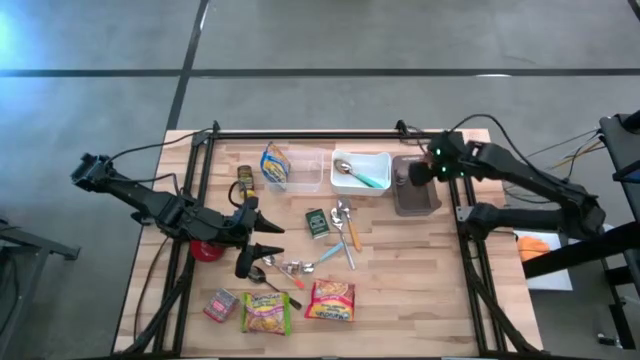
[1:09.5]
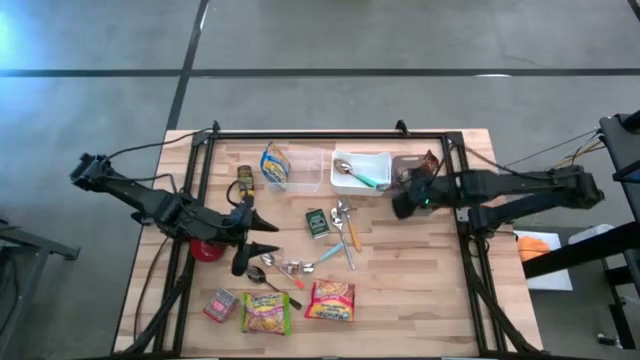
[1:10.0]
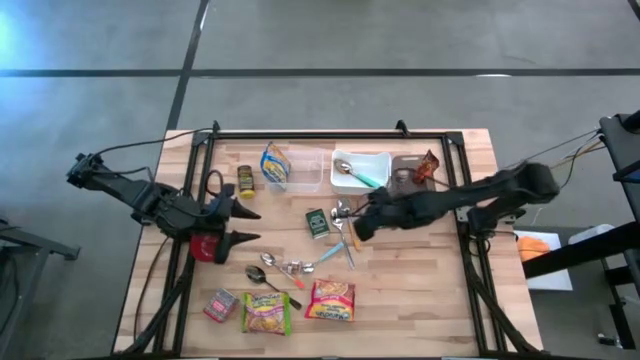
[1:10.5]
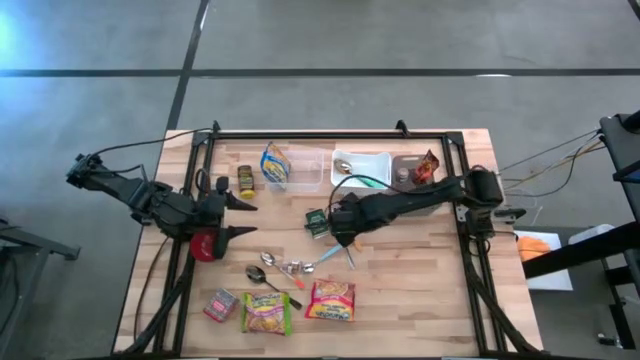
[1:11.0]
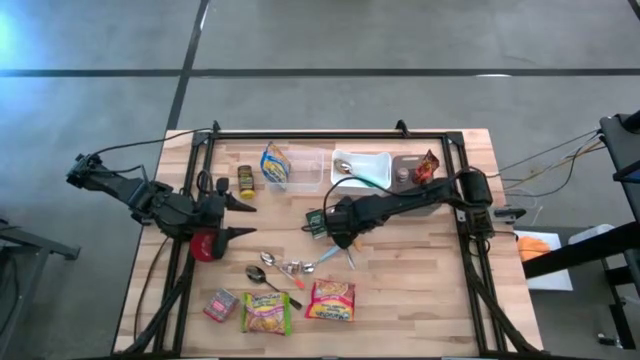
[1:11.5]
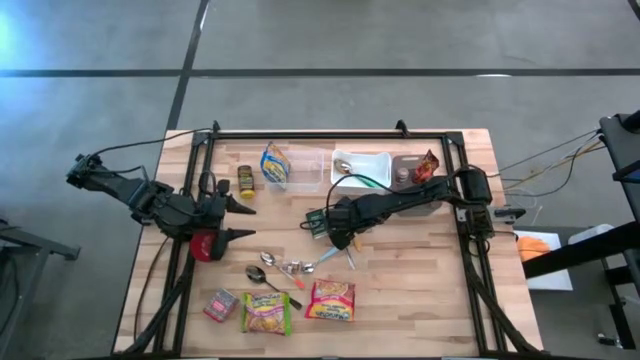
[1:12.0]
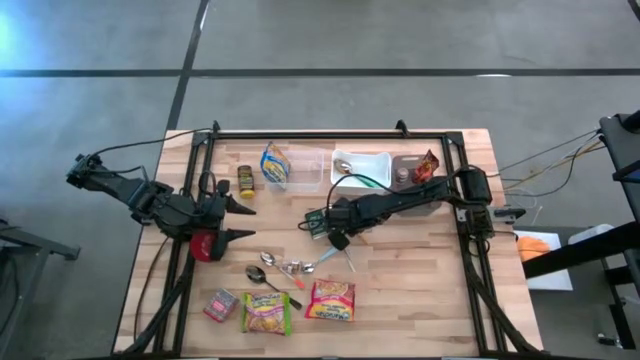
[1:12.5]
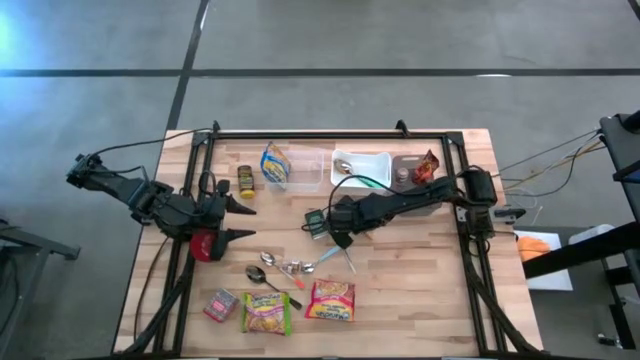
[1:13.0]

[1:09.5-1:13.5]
Put the orange spoon into the white bin

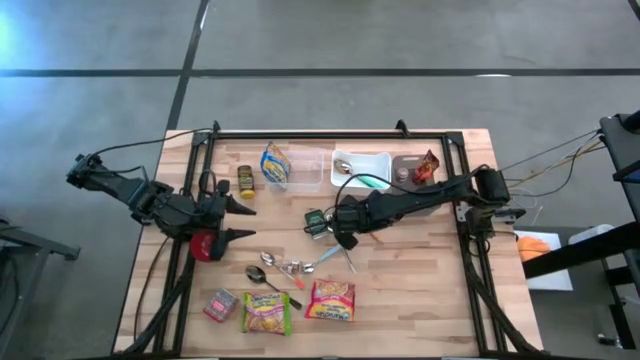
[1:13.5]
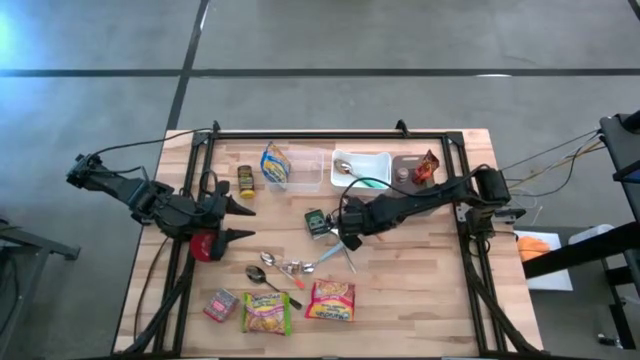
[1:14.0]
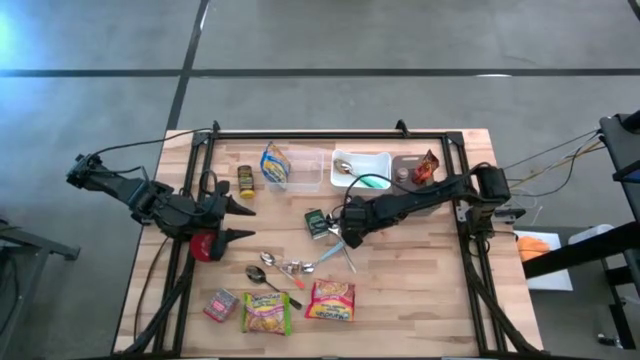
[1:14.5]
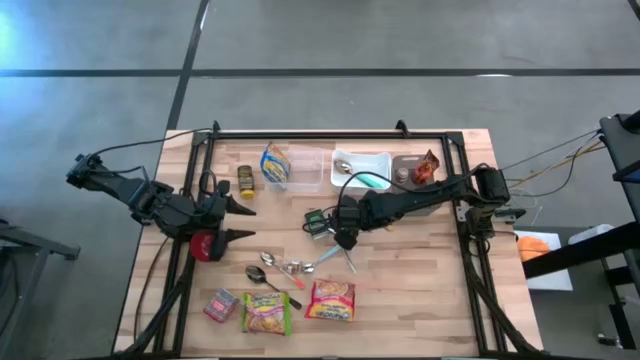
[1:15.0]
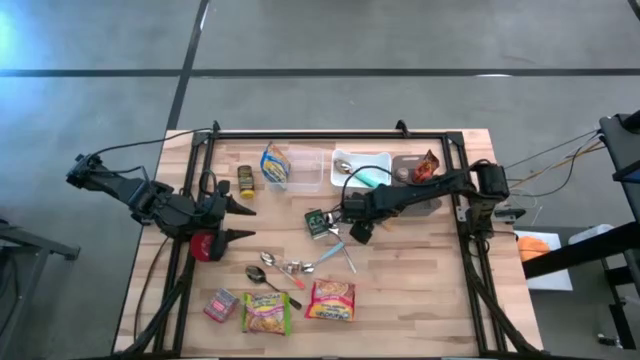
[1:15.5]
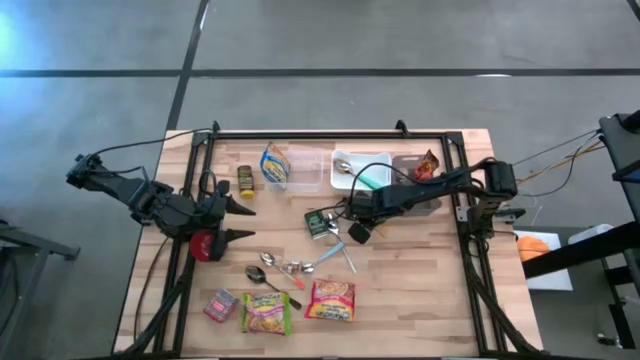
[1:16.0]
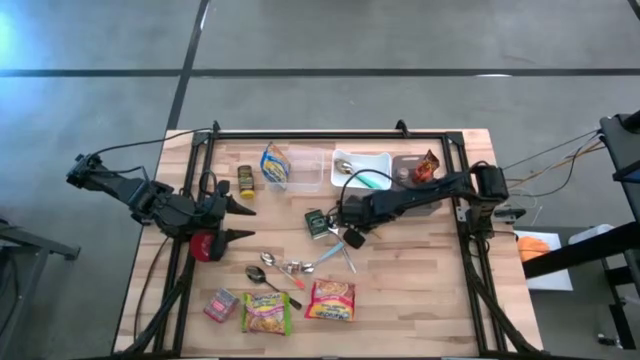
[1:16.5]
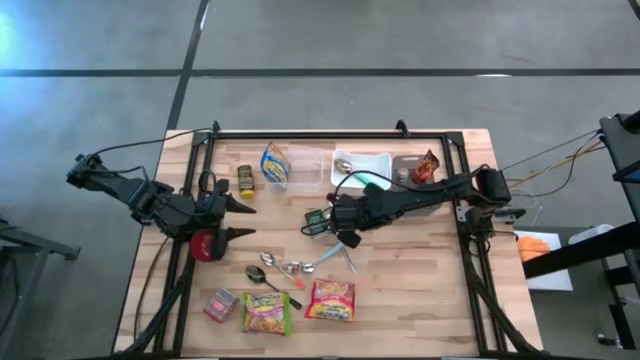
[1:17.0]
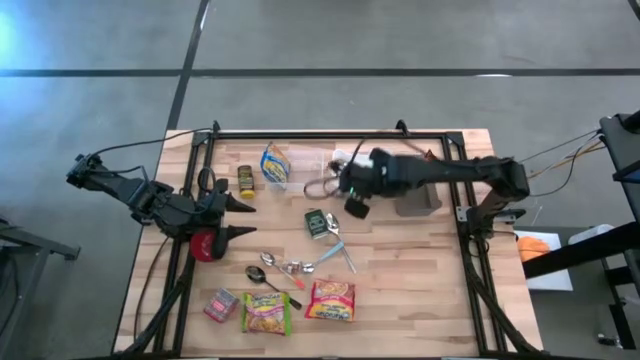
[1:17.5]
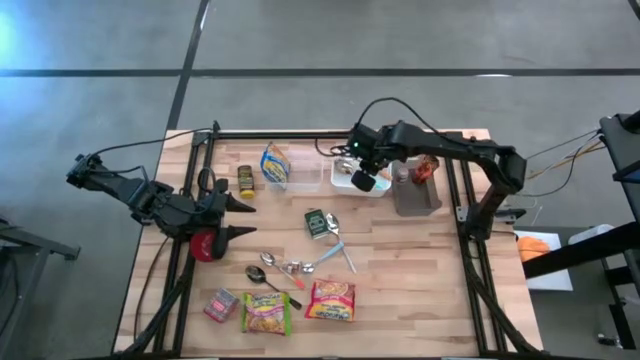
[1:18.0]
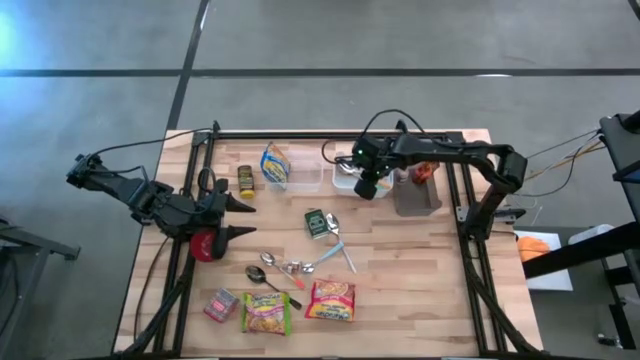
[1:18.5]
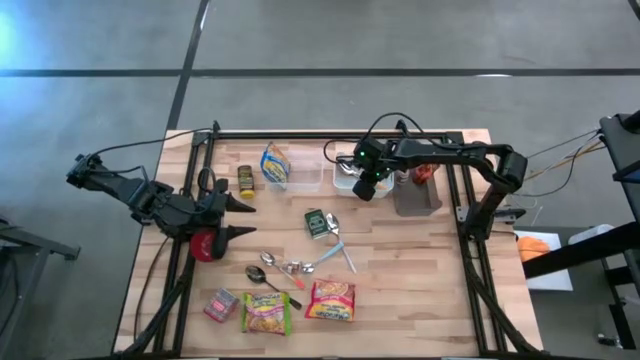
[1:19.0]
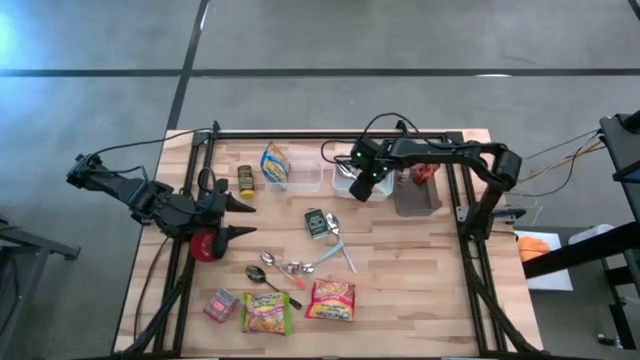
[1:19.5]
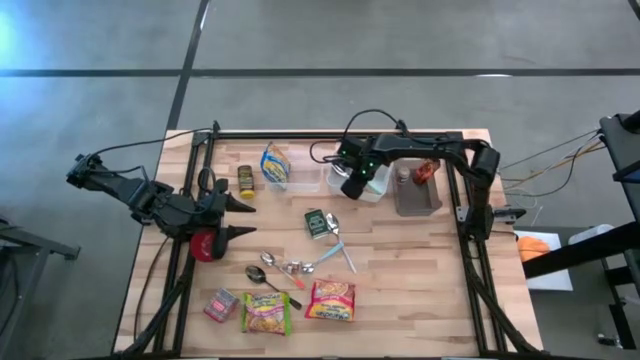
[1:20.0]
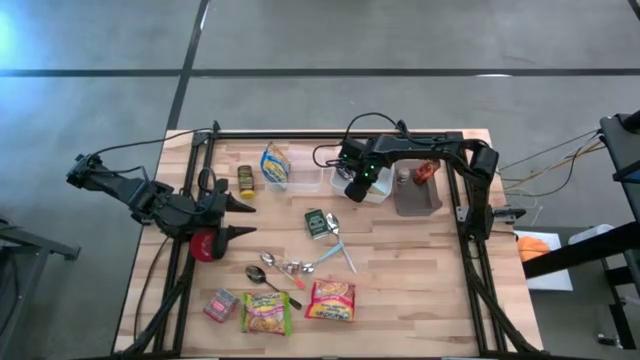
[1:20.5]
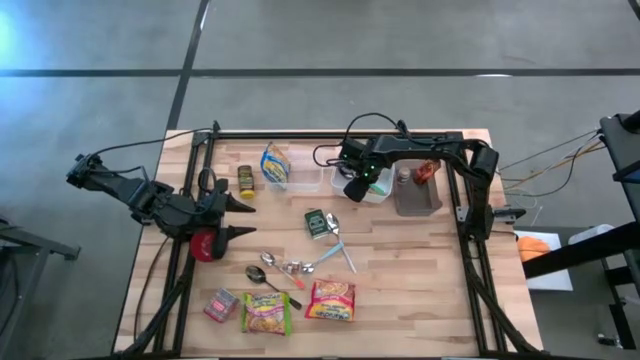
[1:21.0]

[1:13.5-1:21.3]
Put the orange spoon into the white bin

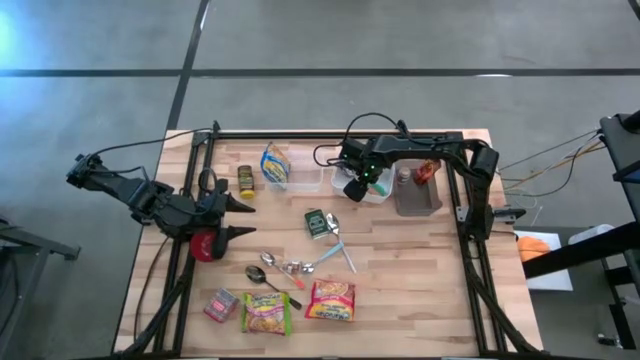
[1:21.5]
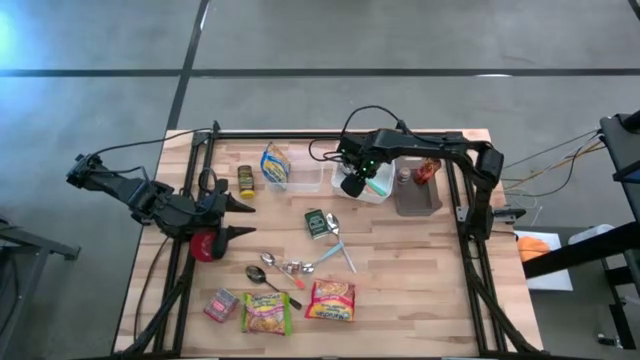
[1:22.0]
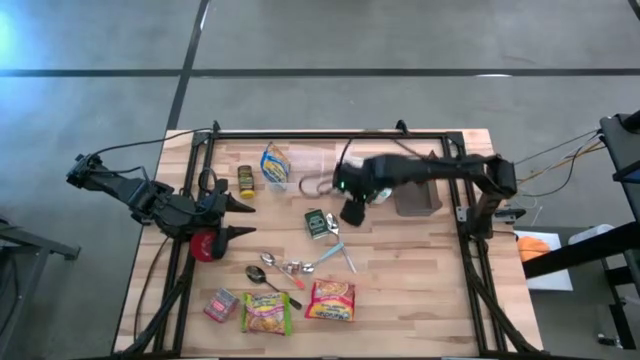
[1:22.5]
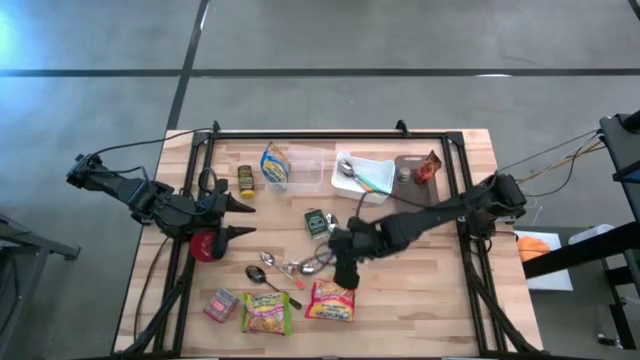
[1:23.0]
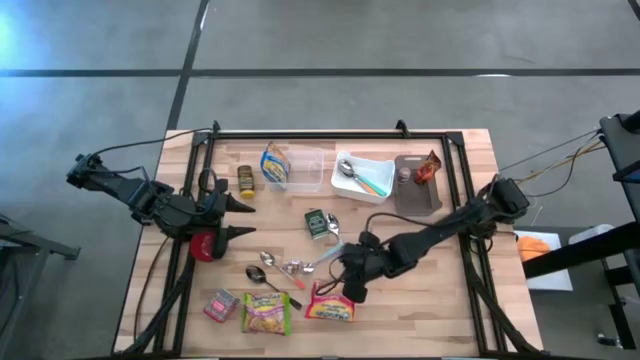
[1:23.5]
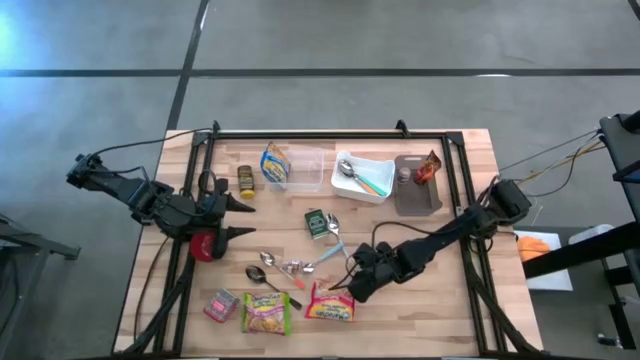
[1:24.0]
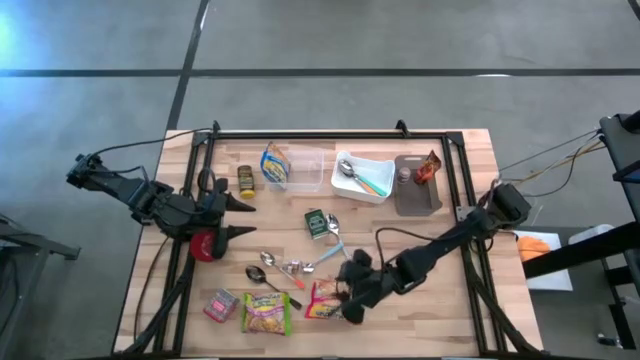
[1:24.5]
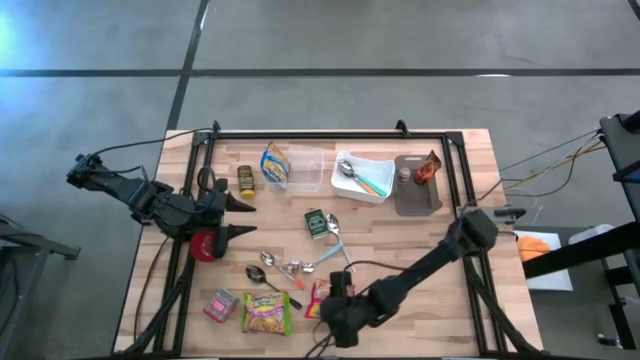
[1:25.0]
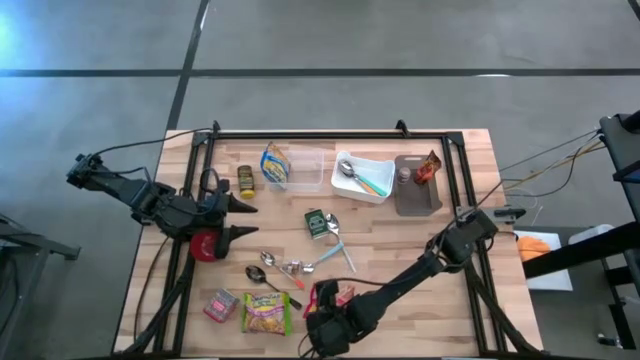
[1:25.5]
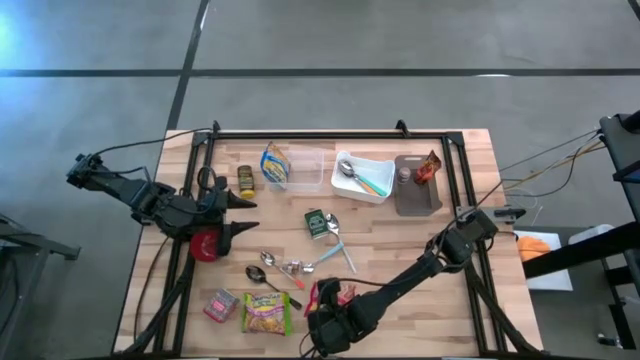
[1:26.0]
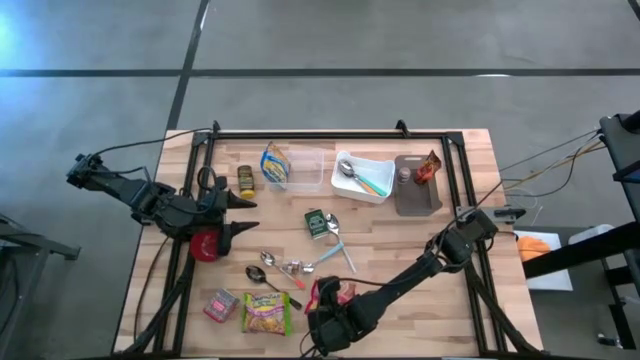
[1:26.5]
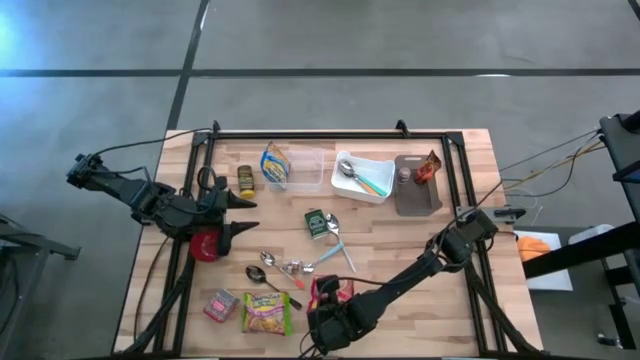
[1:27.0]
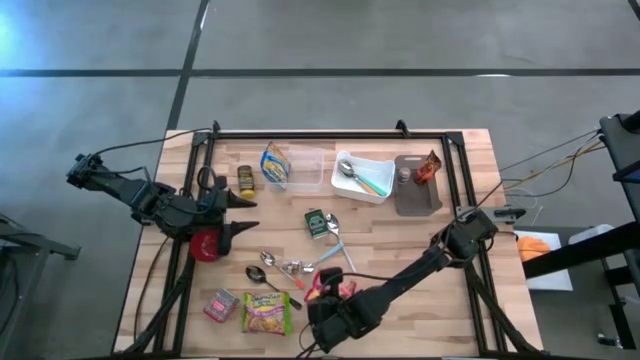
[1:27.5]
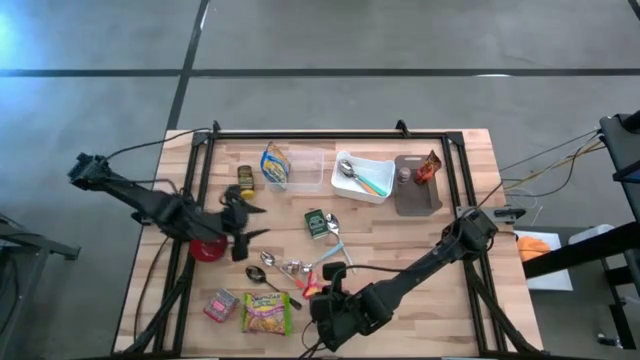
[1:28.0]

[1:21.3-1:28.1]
Put the red noodle pack into the transparent bin
